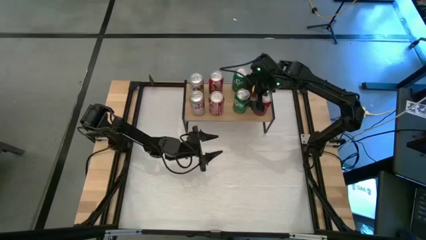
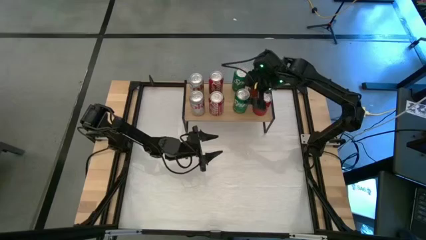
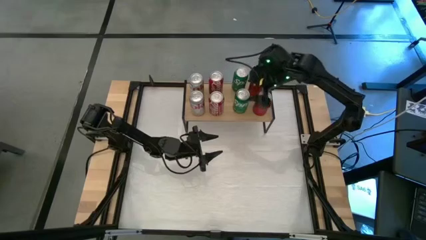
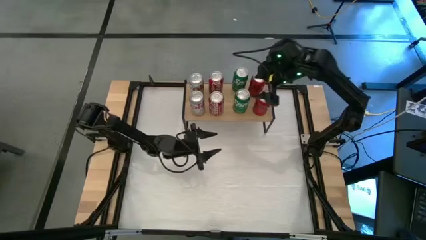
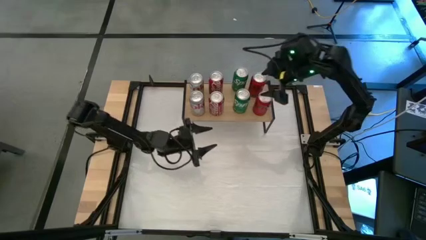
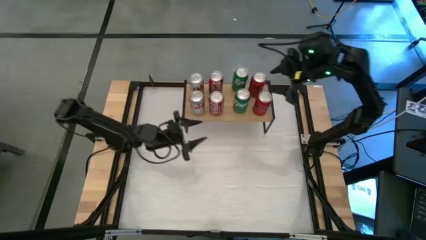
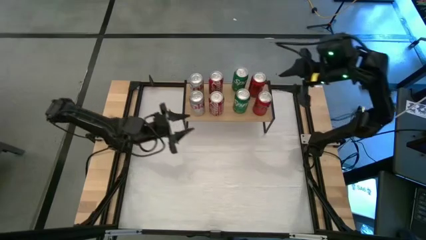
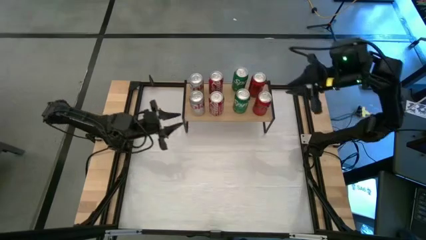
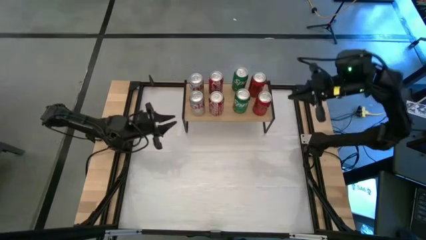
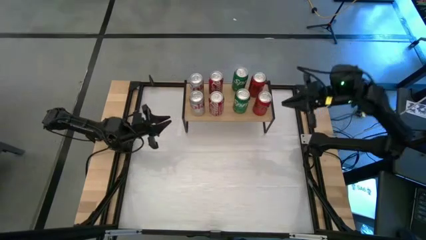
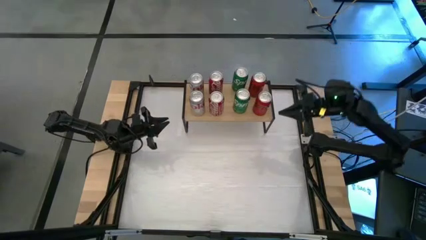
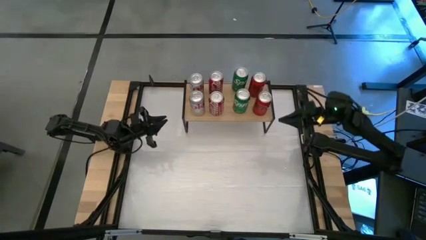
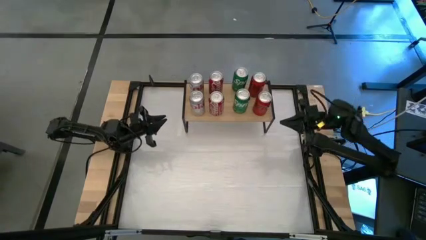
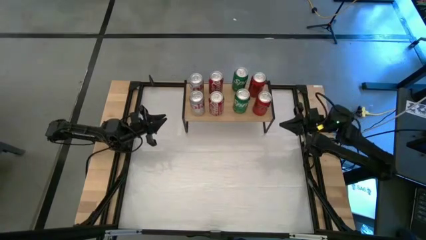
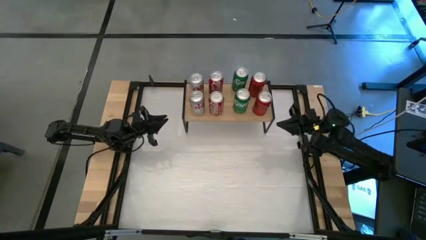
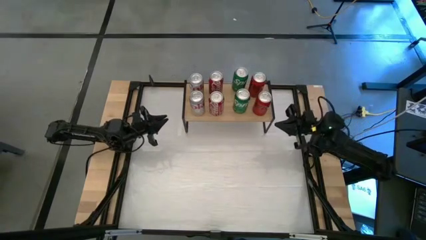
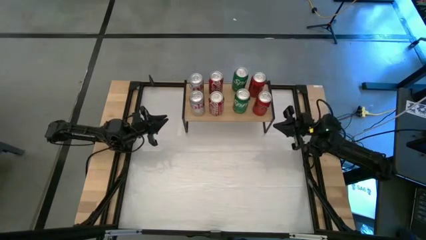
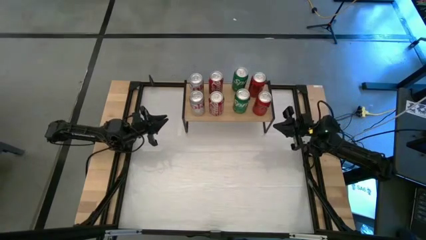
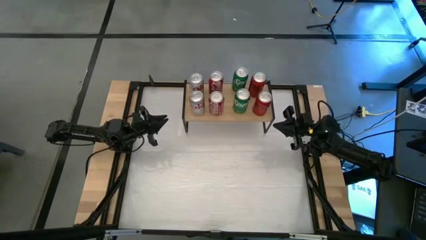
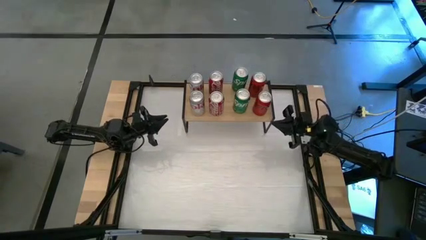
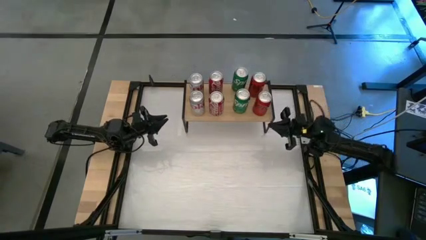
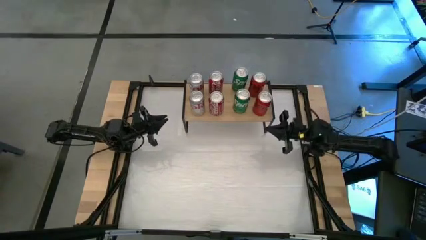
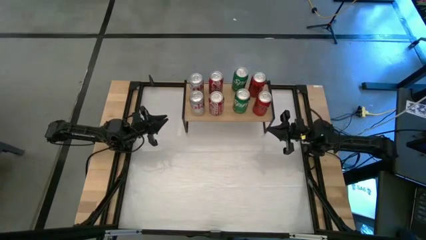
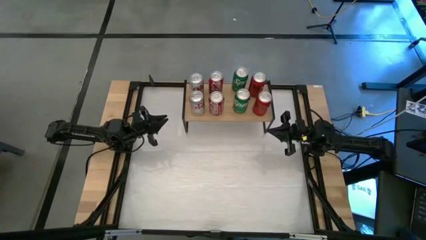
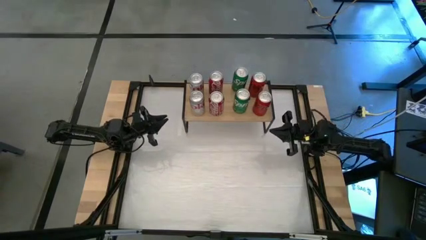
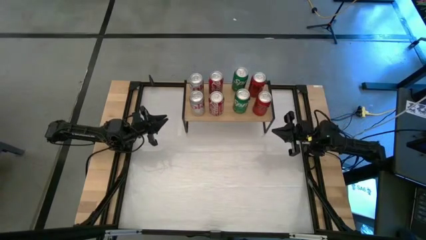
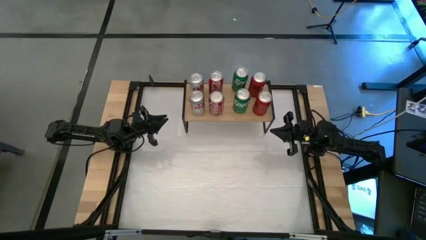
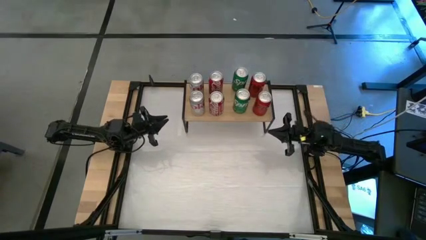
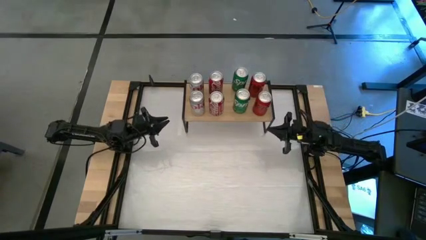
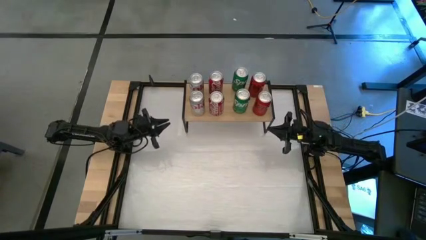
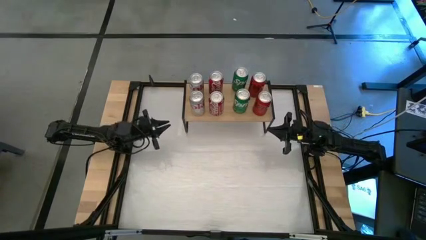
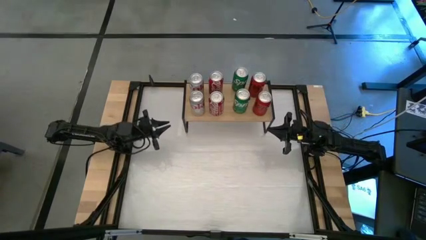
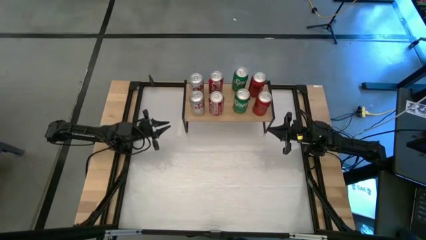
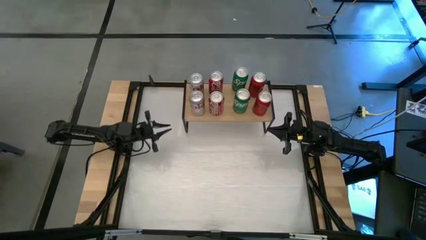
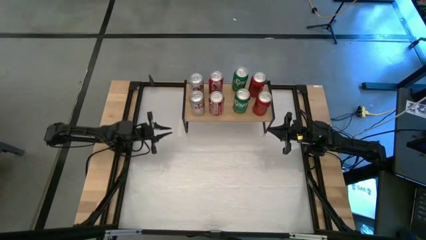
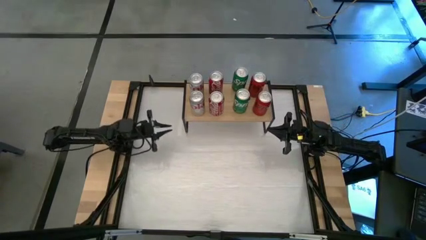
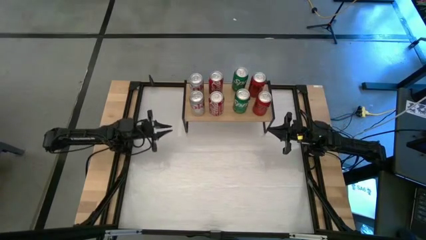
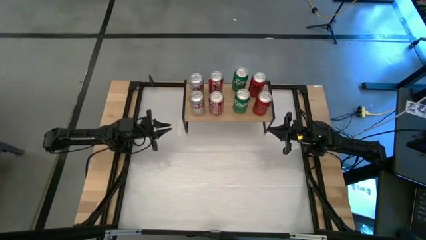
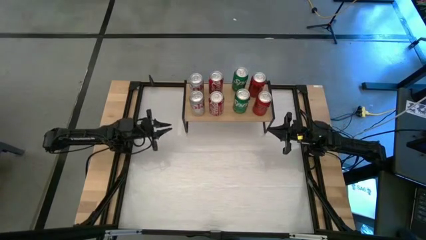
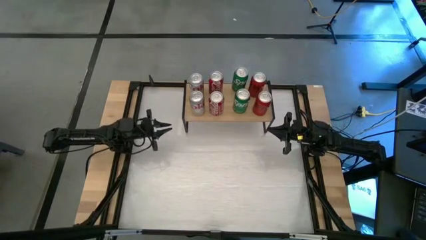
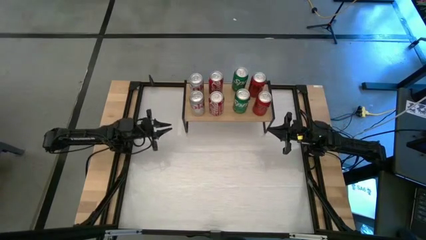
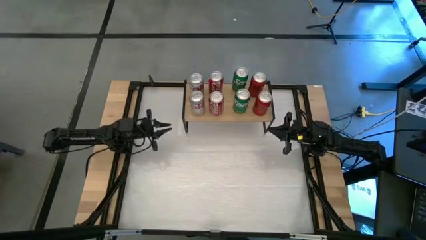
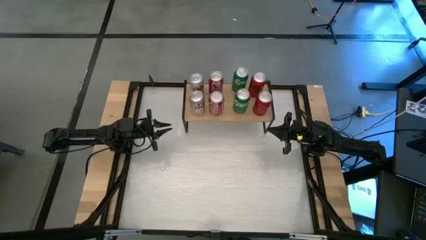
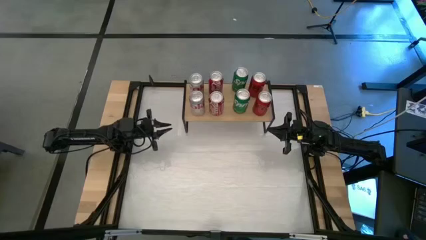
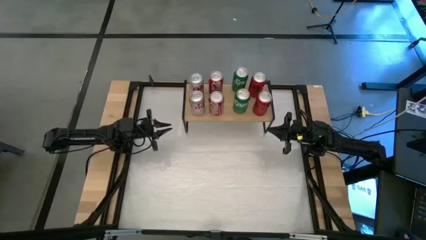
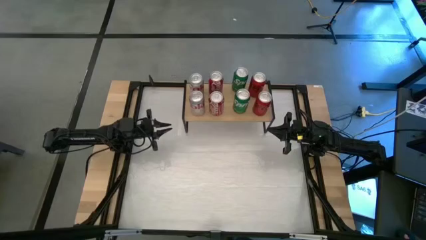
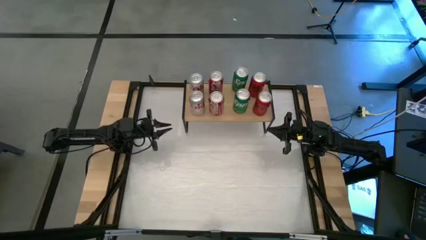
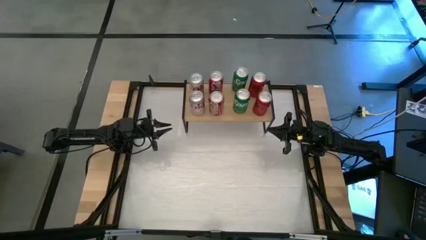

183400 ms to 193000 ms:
Task: Place canned beverage on shelf
Return to Home Position

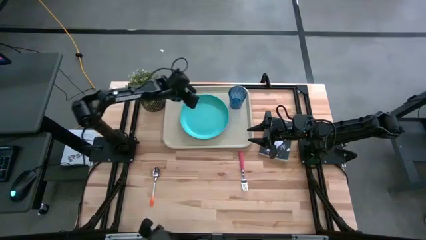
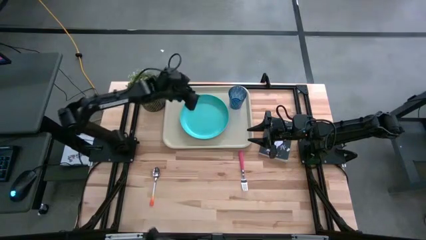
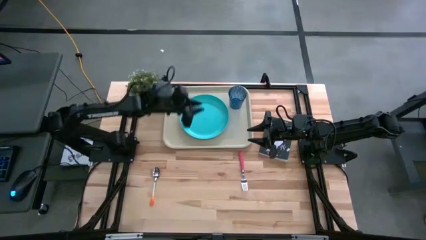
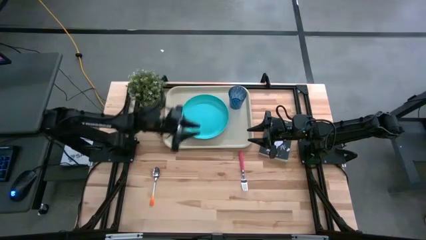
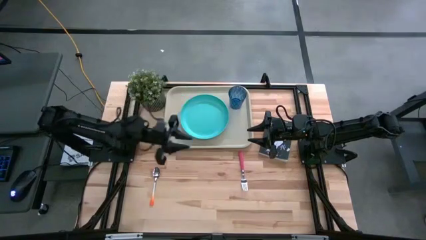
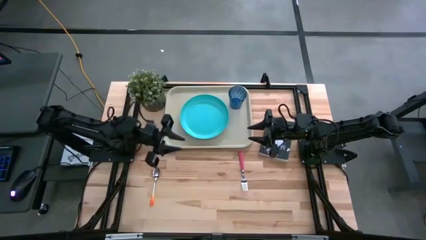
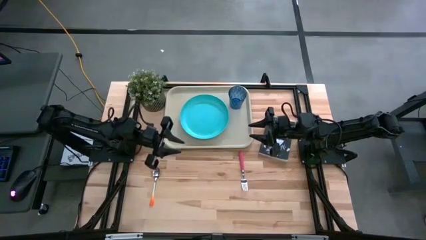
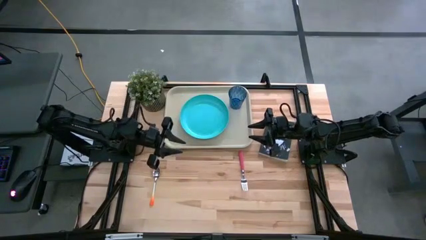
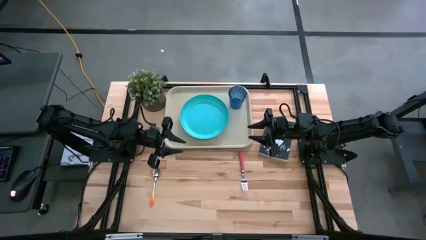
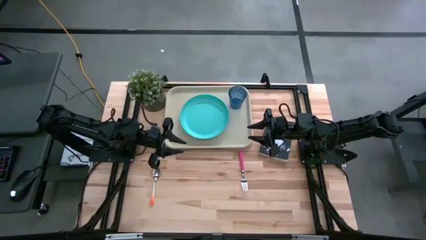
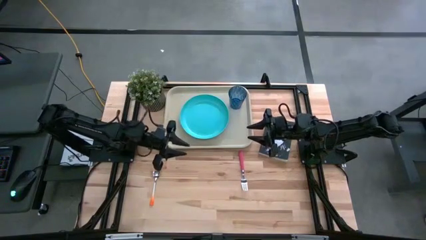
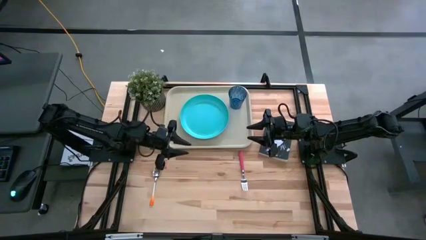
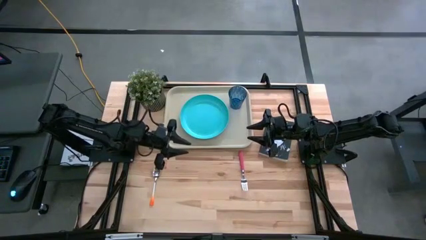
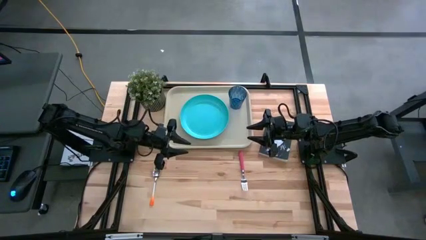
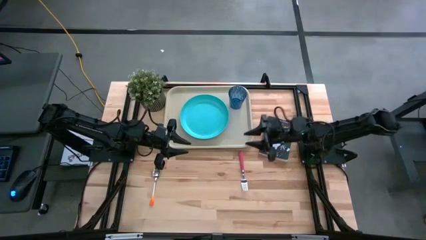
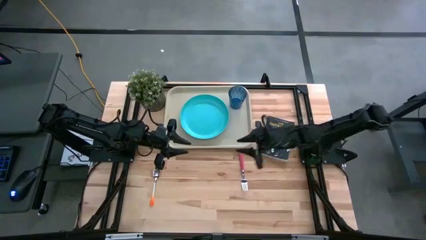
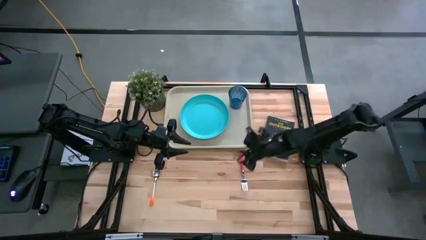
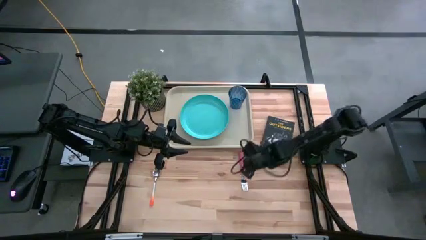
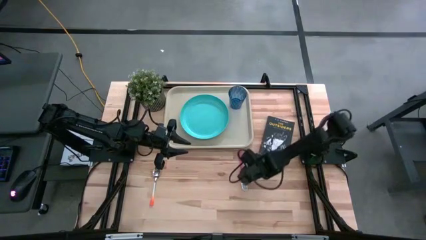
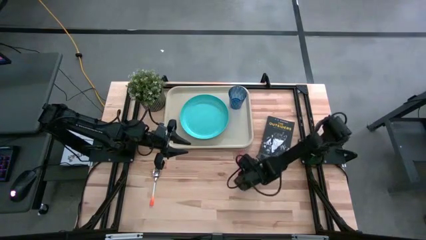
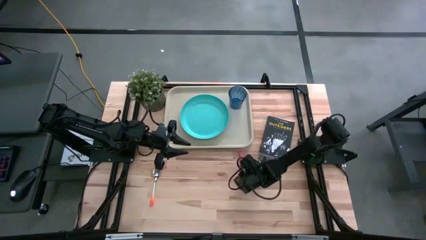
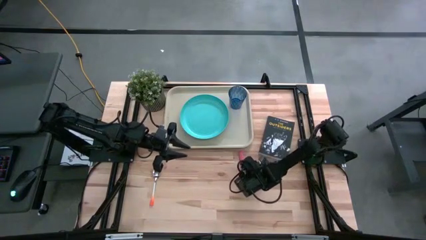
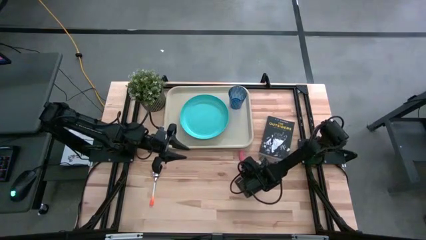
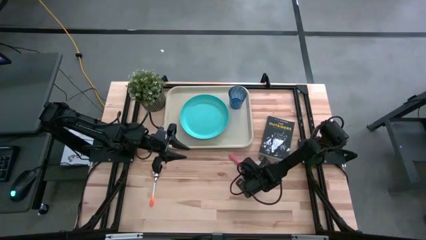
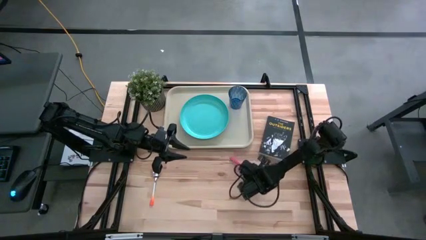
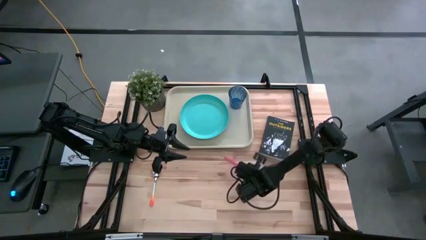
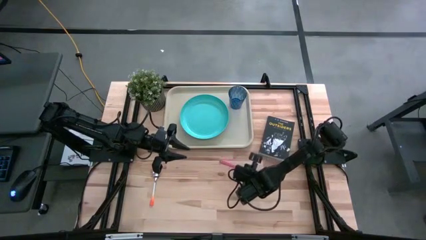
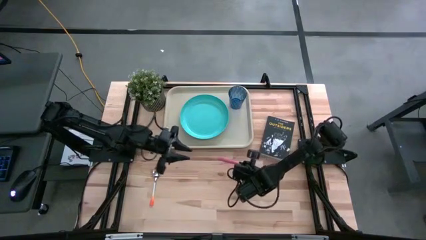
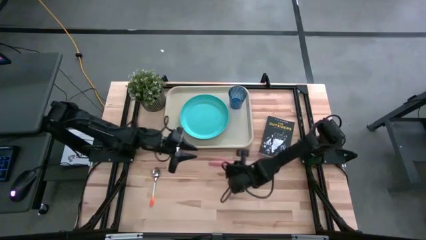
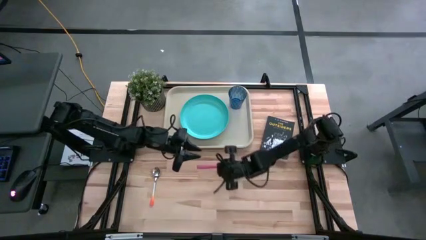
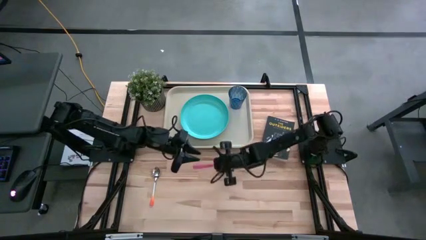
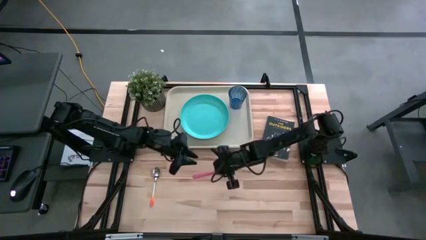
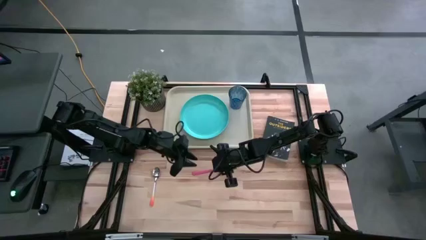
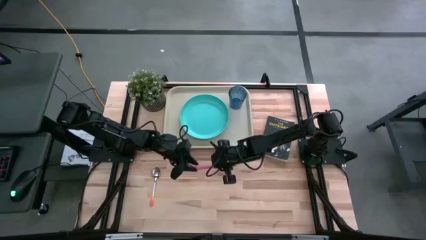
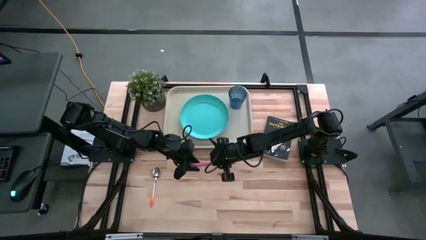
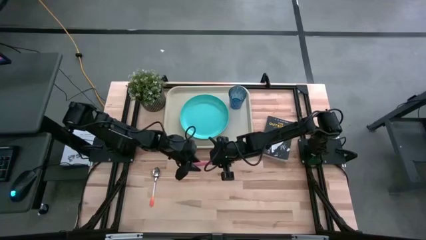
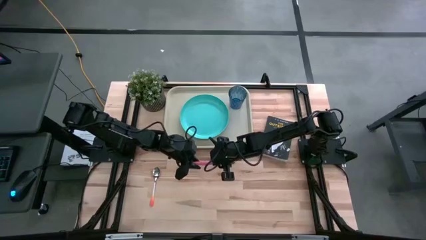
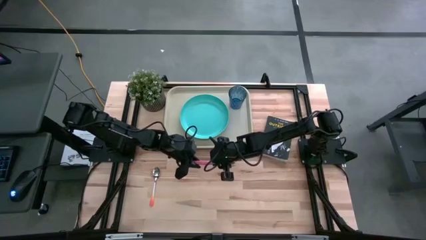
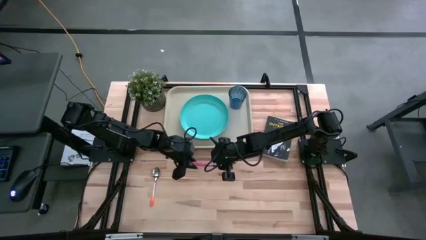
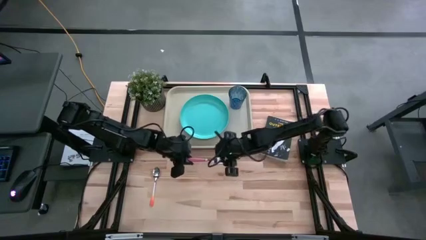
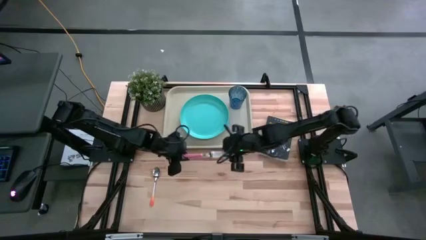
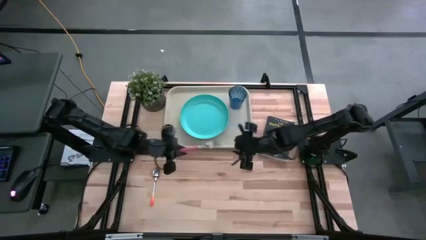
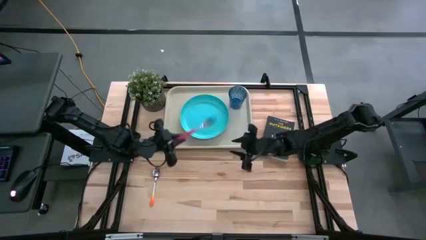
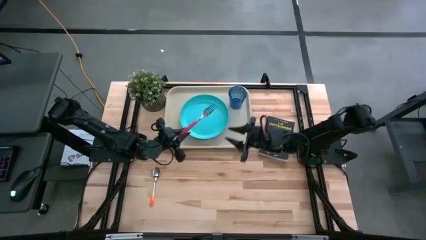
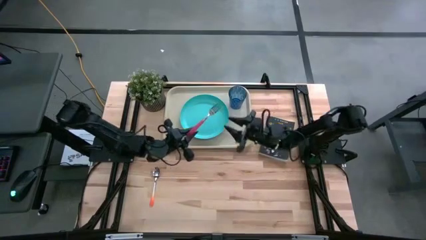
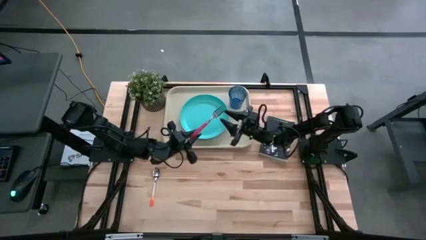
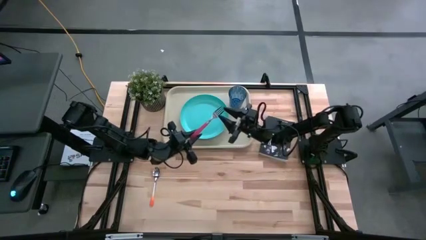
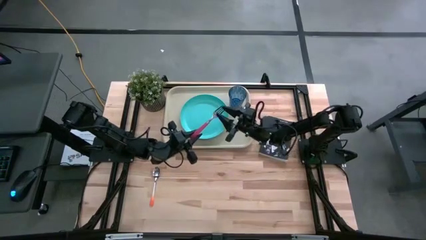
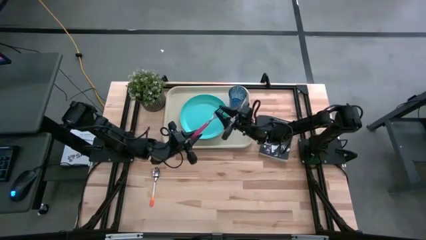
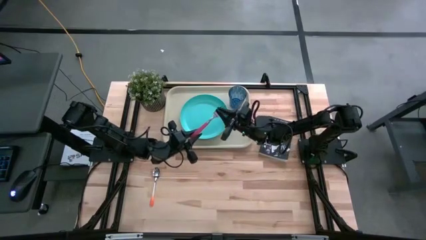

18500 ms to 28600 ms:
Task: Pick and place plate/cup/fork/spoon on tray
Put the red fork on the white serving tray to the left of the blue plate
